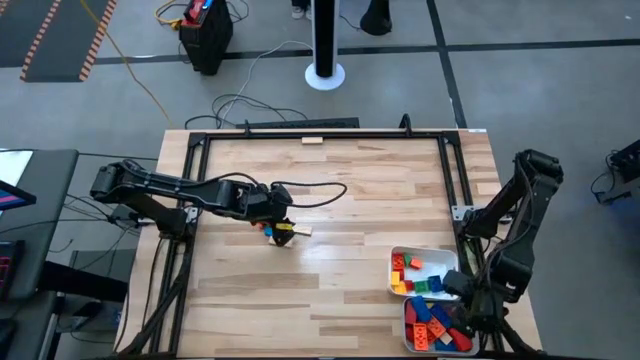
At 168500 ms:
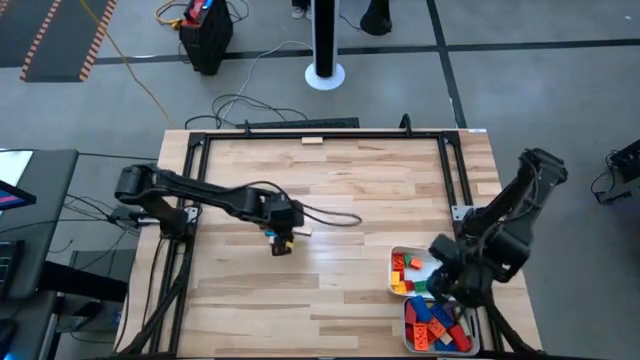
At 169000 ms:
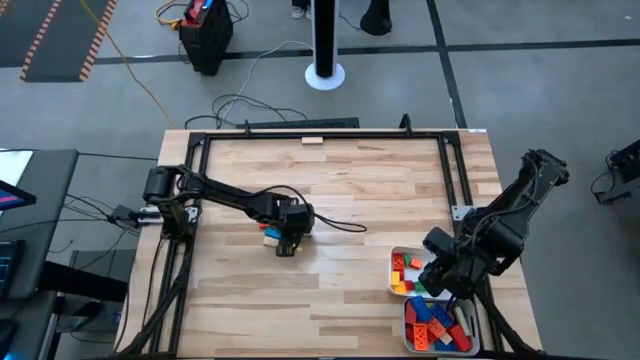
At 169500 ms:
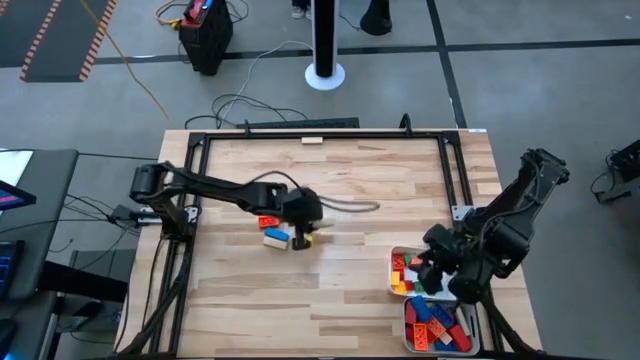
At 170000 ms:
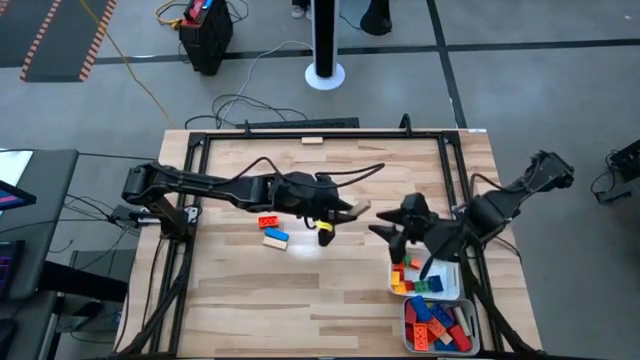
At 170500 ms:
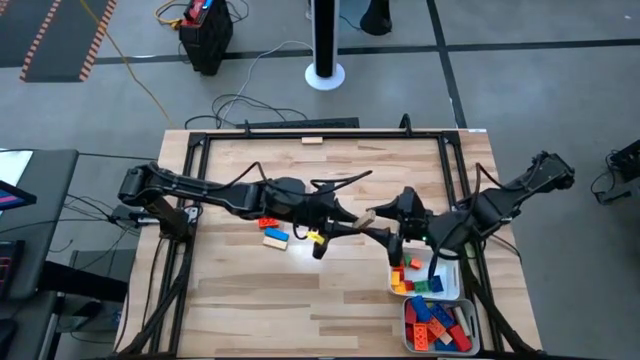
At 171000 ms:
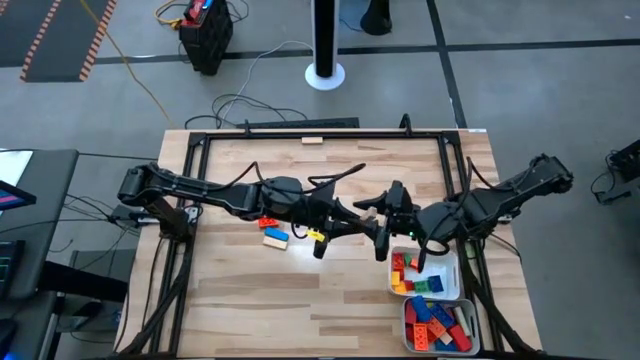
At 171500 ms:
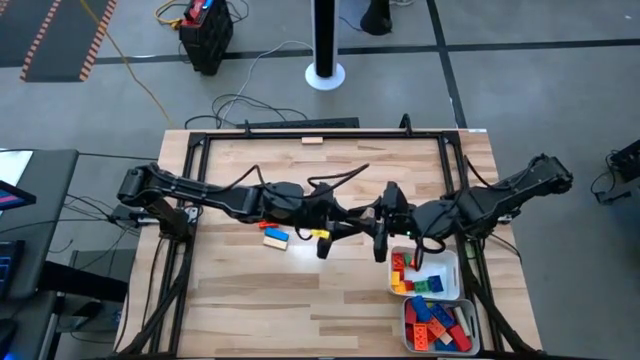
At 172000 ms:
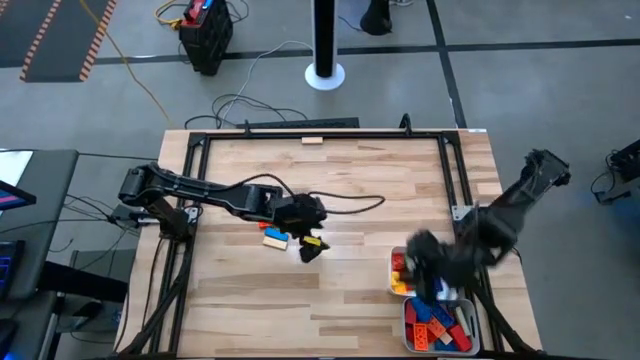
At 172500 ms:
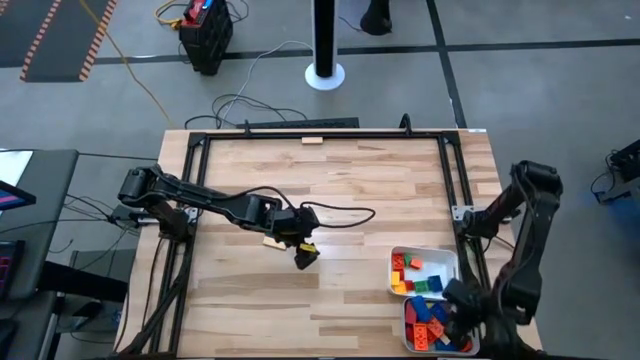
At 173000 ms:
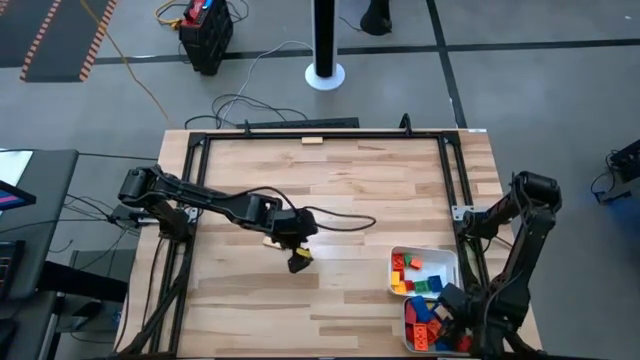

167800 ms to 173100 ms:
Task: Sort blocks by size
Put the big brown block into the gray bin

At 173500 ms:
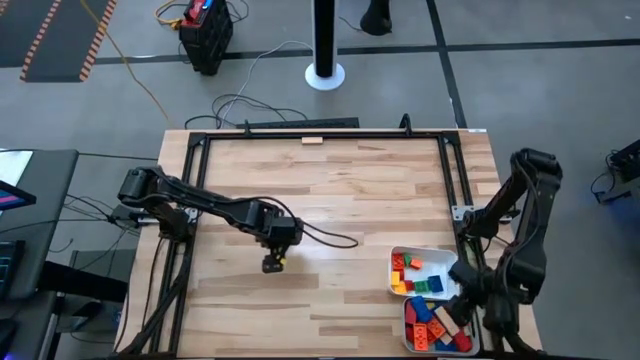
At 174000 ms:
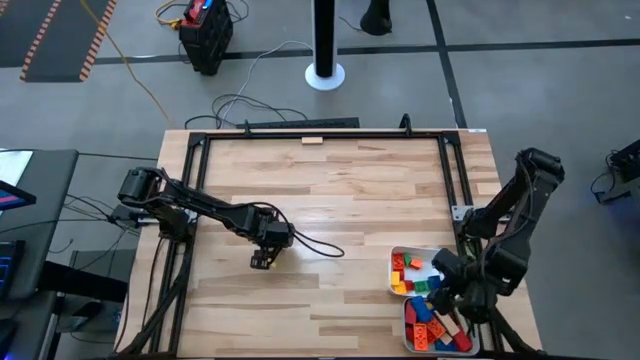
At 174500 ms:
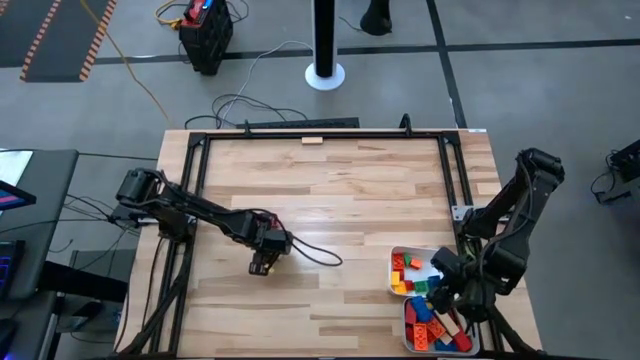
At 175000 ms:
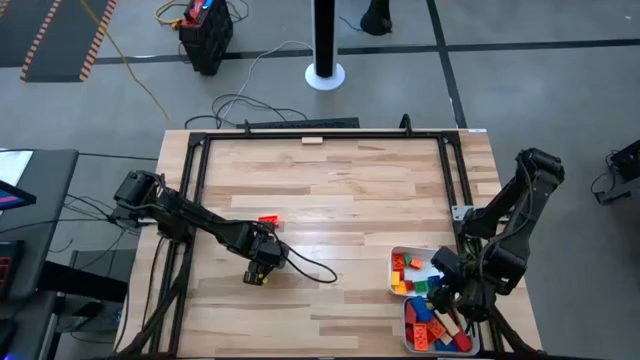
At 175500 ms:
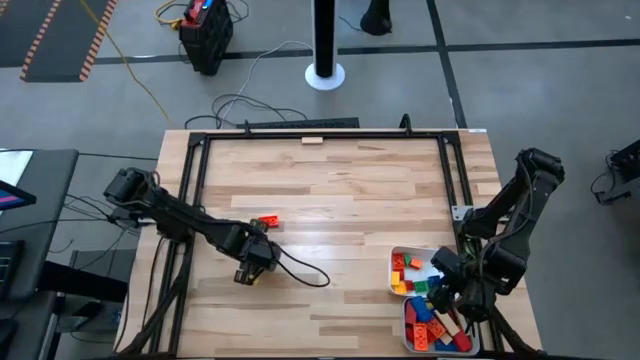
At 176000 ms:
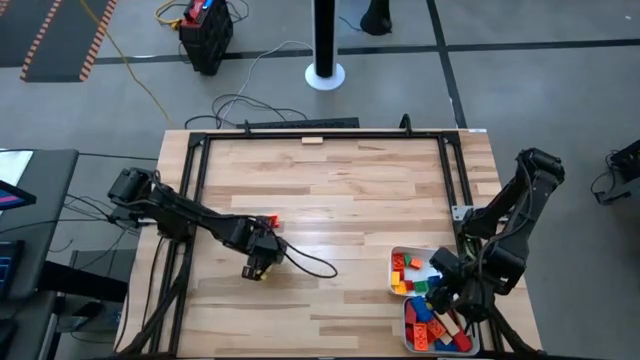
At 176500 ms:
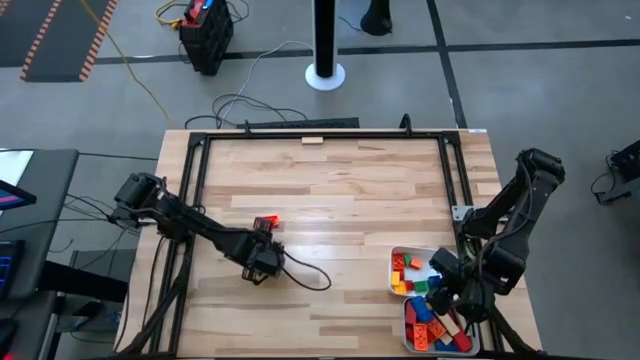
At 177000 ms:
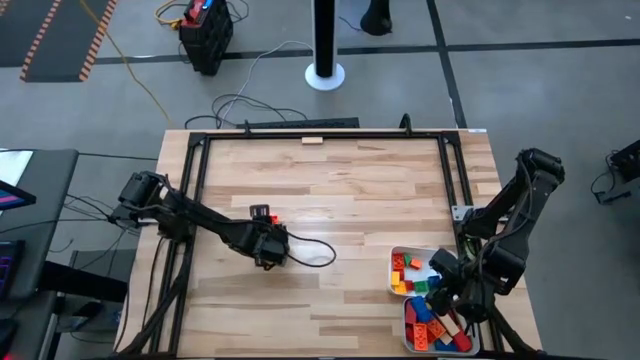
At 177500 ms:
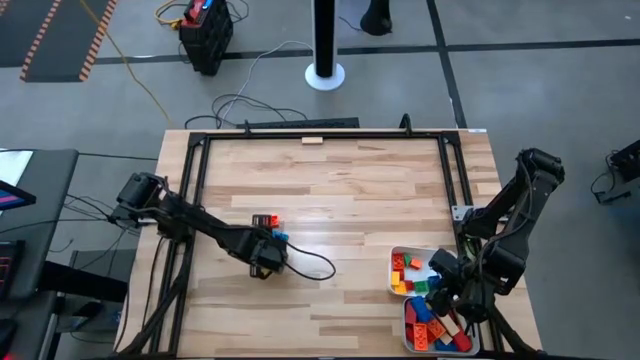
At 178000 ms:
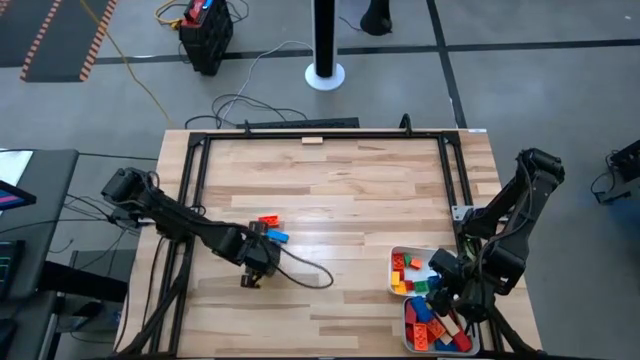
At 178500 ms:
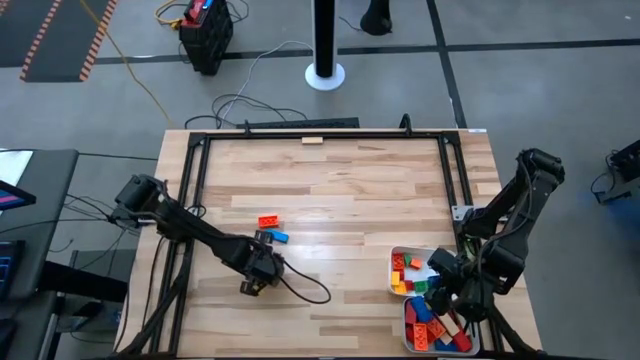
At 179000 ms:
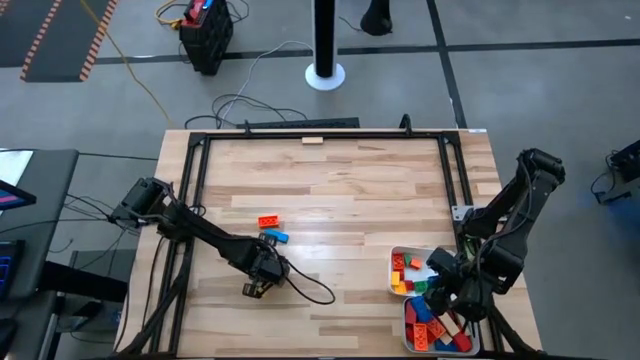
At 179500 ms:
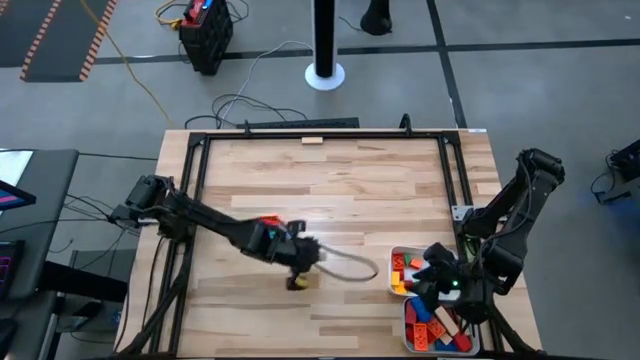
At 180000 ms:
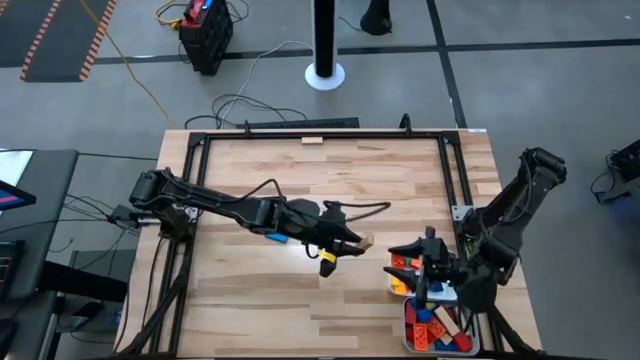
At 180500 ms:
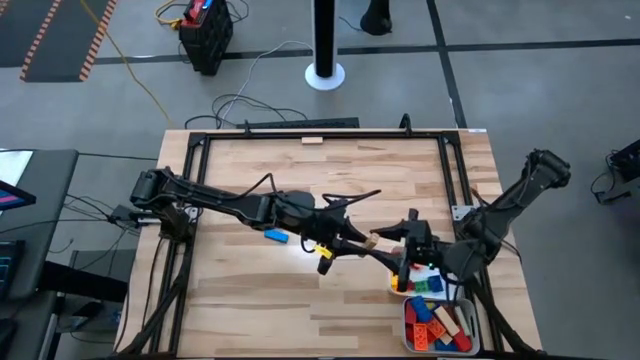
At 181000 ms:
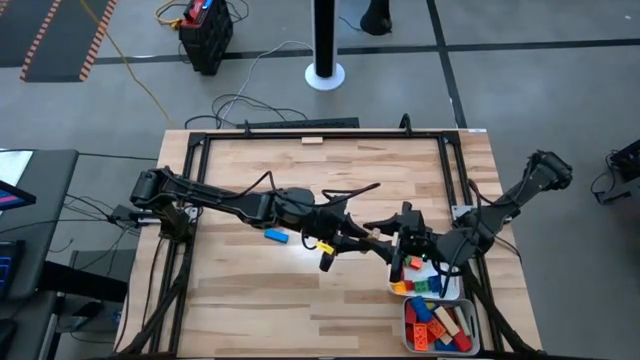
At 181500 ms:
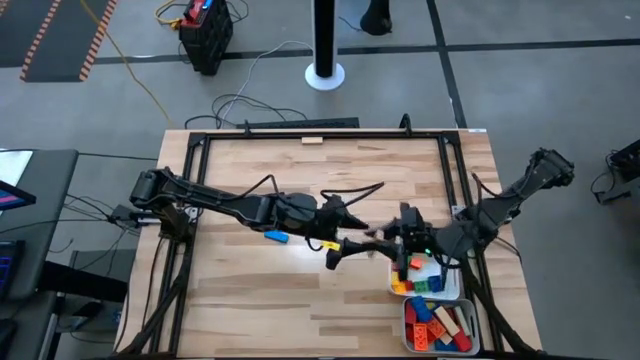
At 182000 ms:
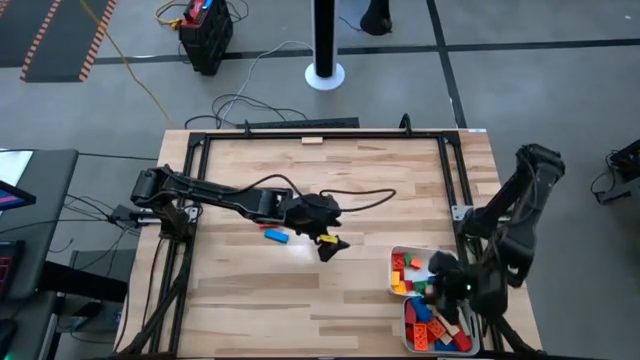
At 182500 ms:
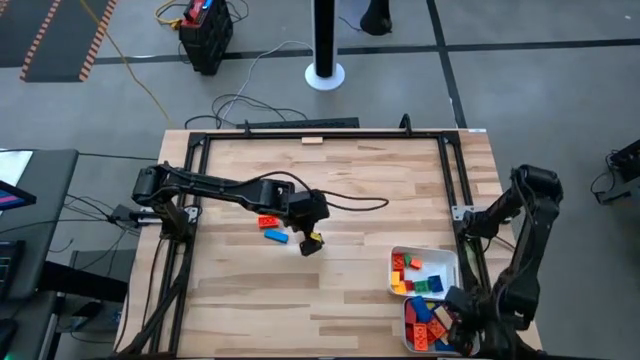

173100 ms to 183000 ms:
Put the big brown block into the gray bin

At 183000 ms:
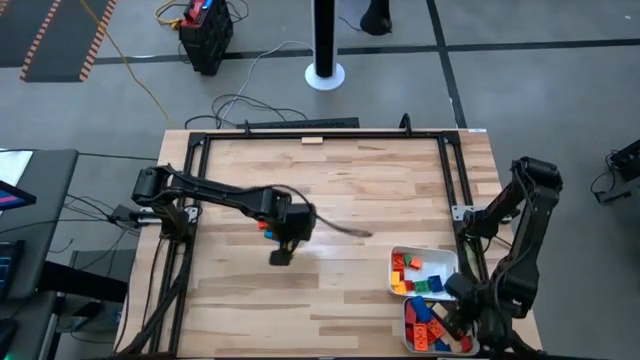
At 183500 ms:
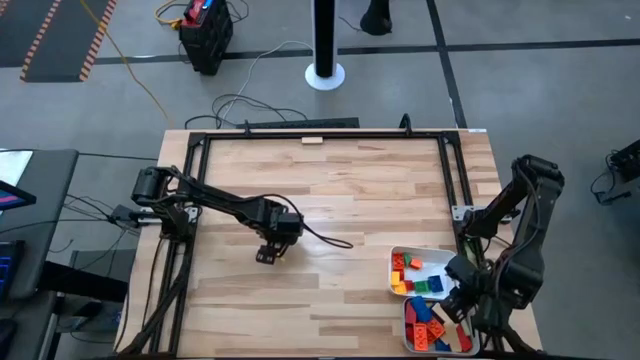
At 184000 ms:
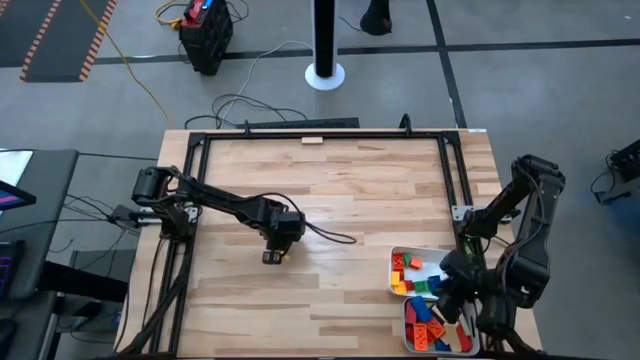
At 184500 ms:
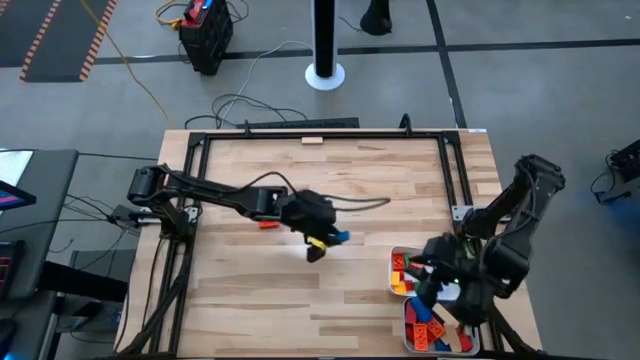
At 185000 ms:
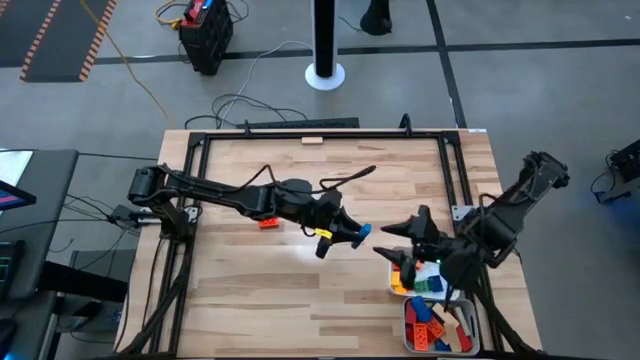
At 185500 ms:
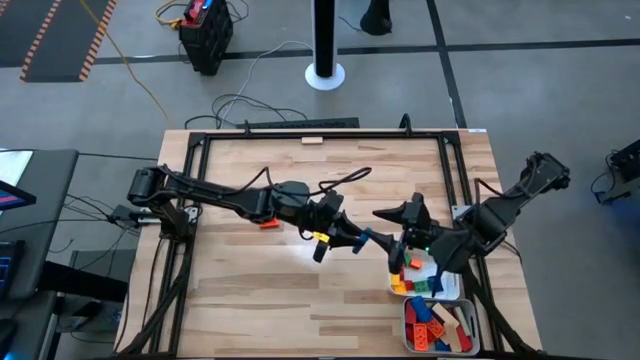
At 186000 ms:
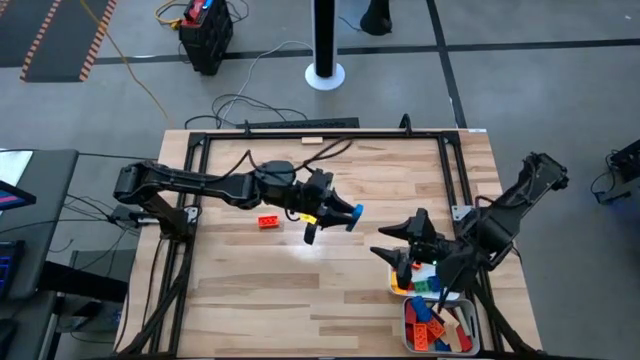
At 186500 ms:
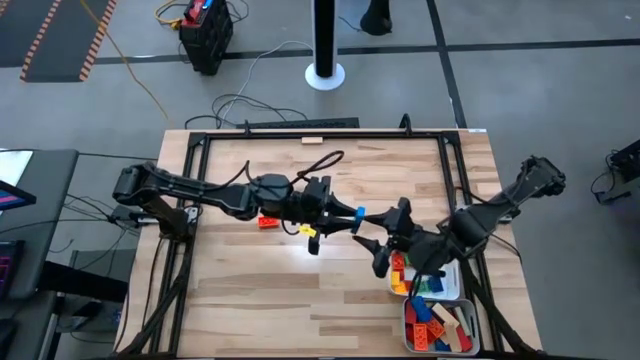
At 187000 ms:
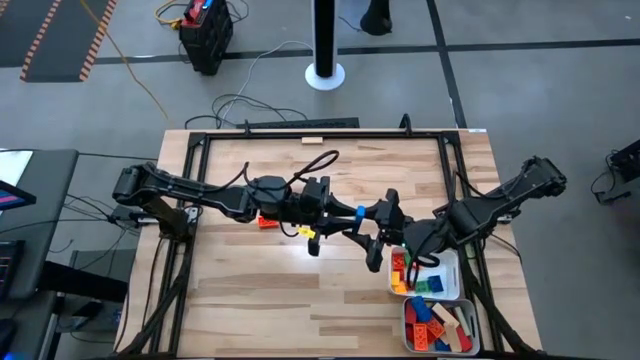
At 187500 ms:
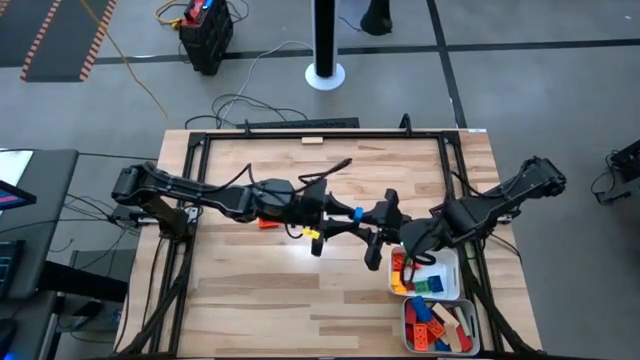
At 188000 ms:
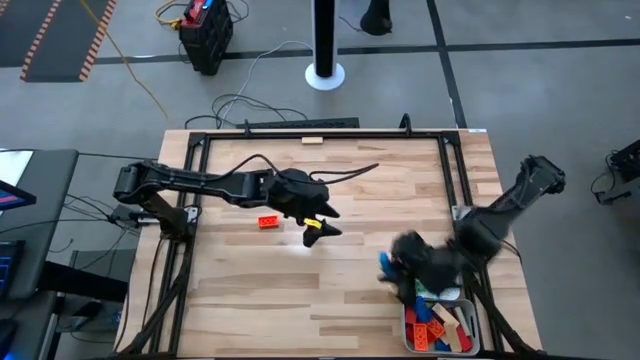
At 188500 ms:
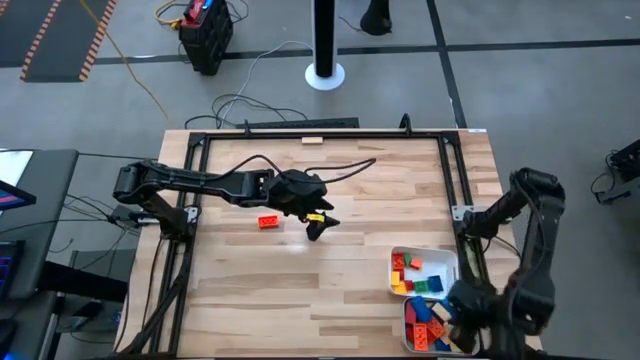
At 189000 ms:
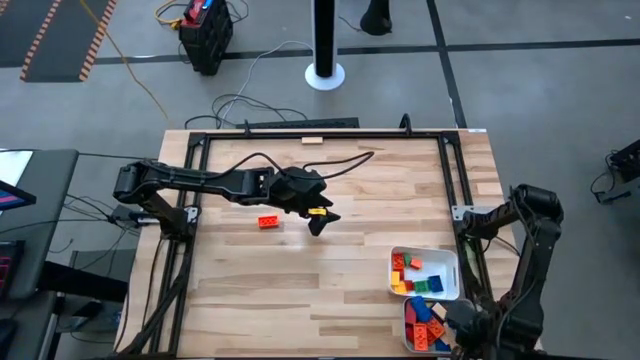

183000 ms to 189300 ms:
Put the big blue block into the gray bin

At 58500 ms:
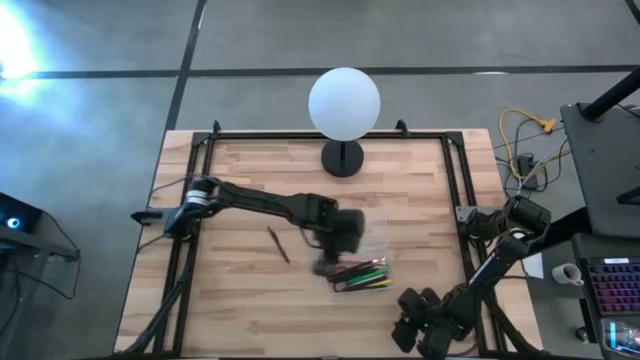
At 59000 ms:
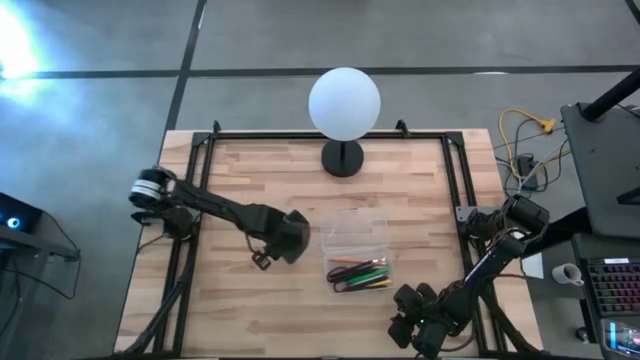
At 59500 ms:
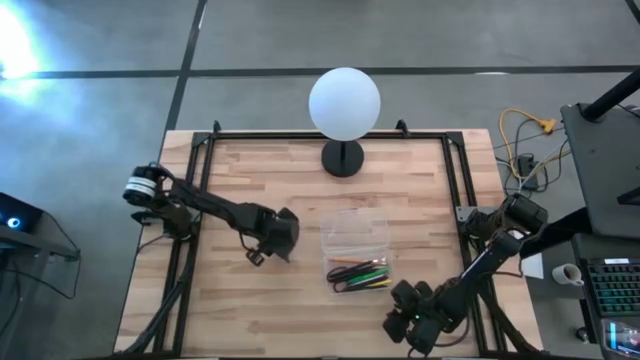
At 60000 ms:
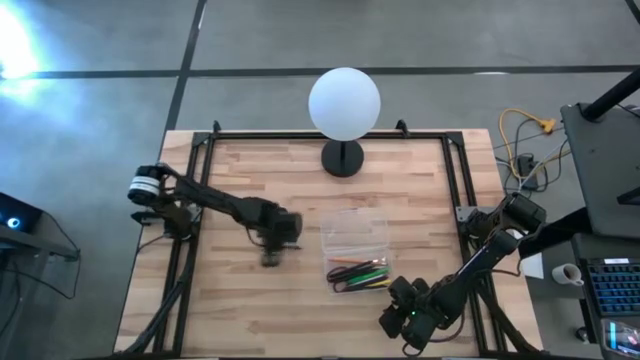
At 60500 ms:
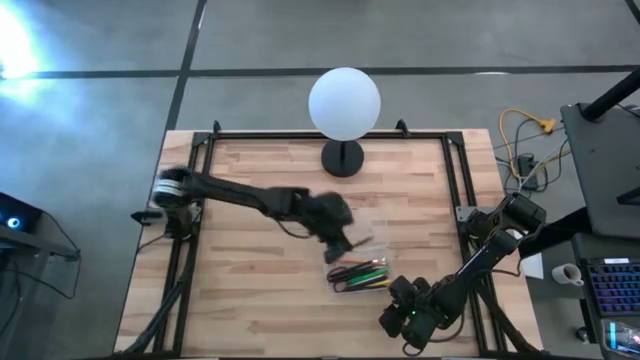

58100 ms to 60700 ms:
Task: Pick & place school supplies into a supply box
Put the brown pen into the transparent supply box
